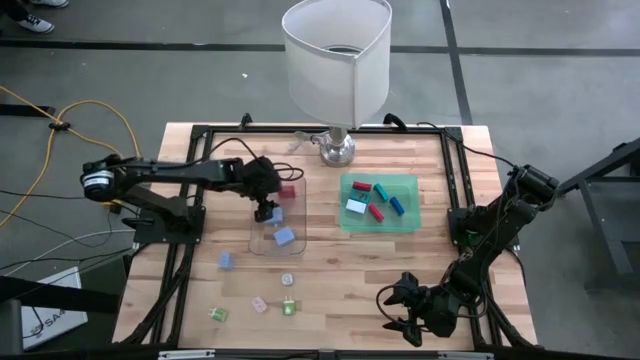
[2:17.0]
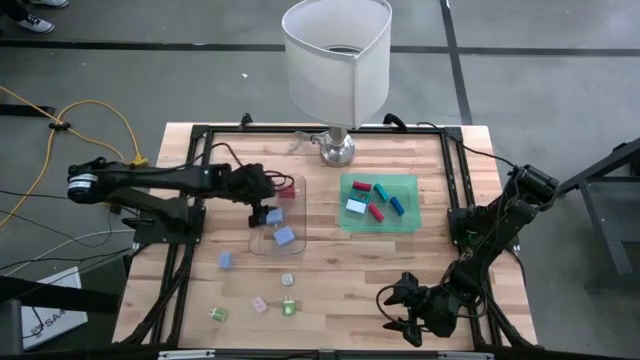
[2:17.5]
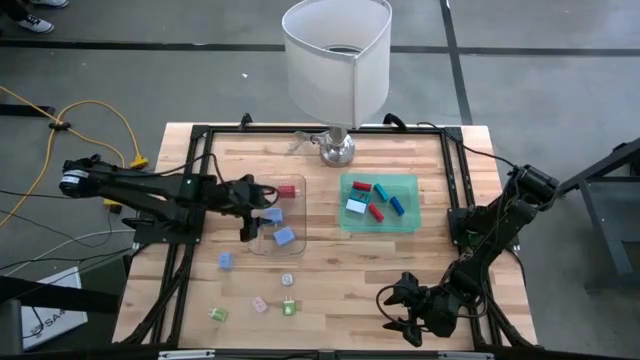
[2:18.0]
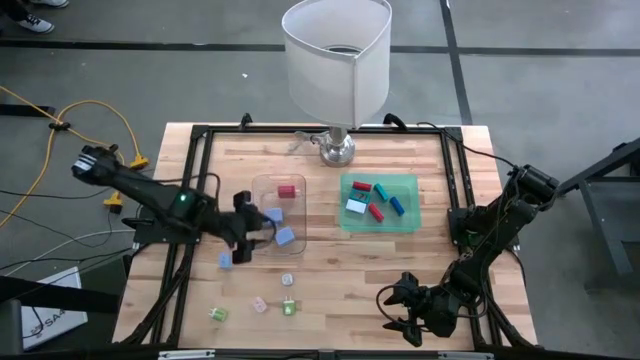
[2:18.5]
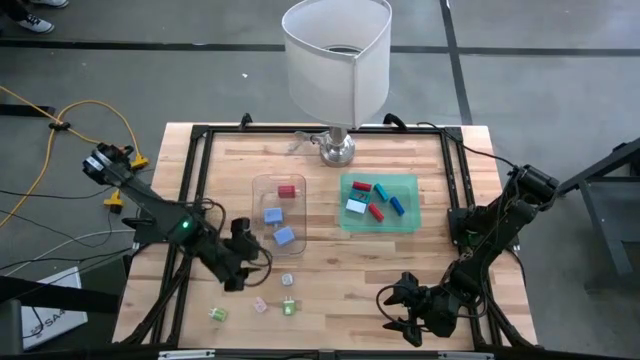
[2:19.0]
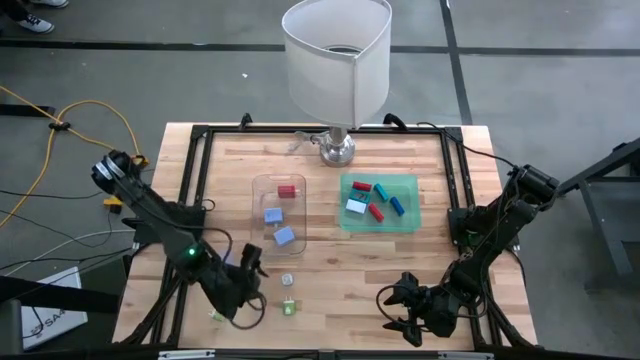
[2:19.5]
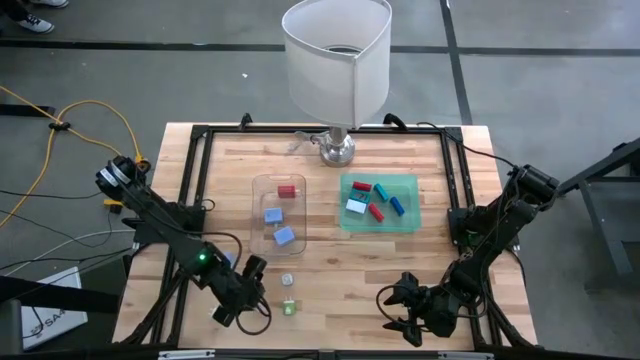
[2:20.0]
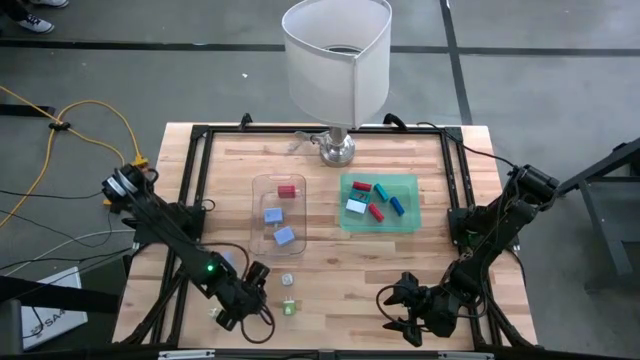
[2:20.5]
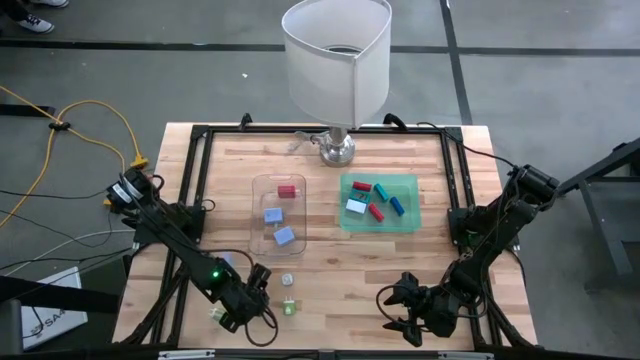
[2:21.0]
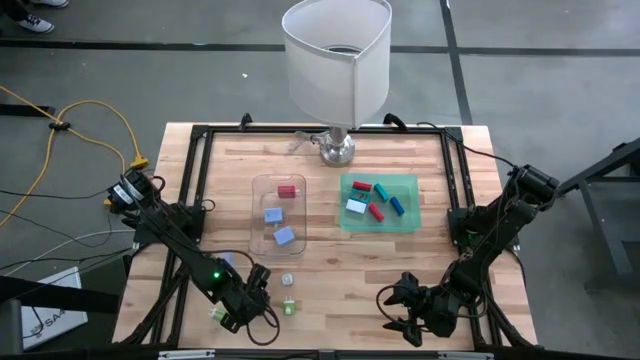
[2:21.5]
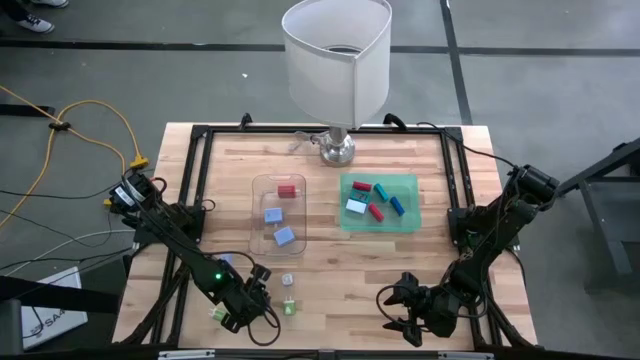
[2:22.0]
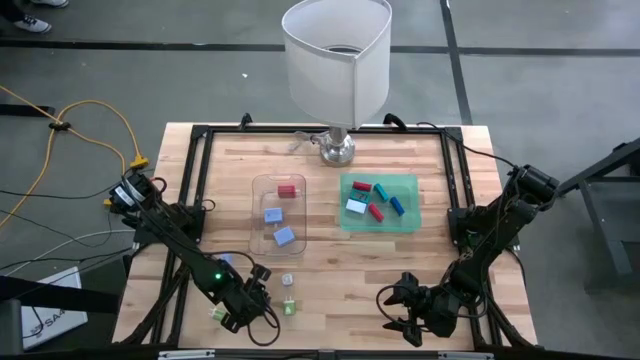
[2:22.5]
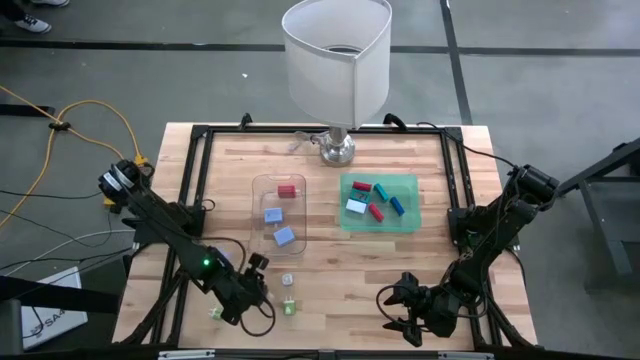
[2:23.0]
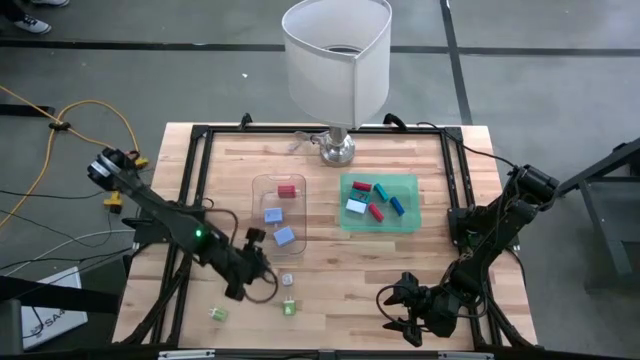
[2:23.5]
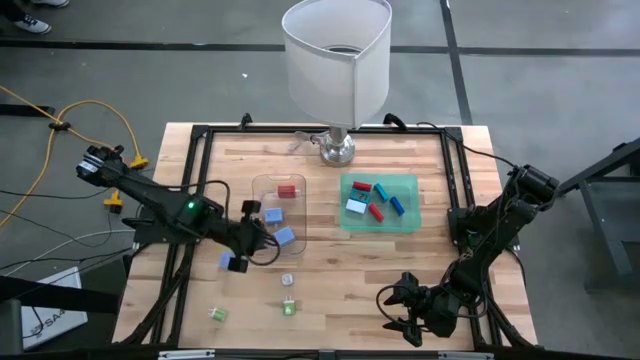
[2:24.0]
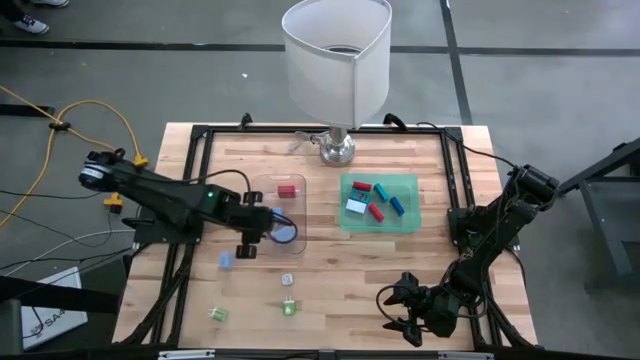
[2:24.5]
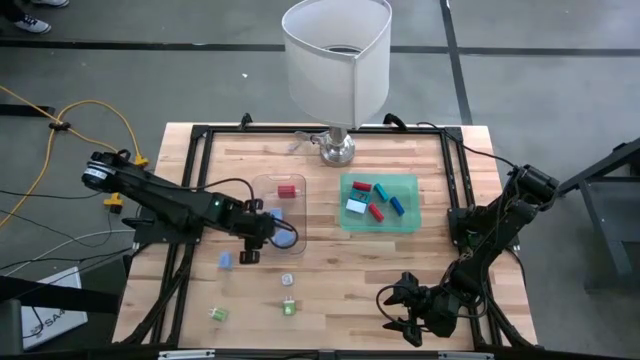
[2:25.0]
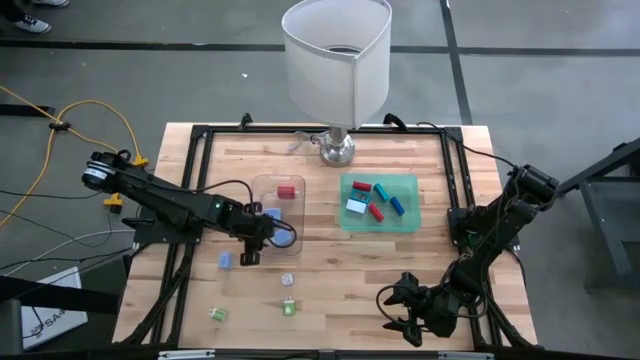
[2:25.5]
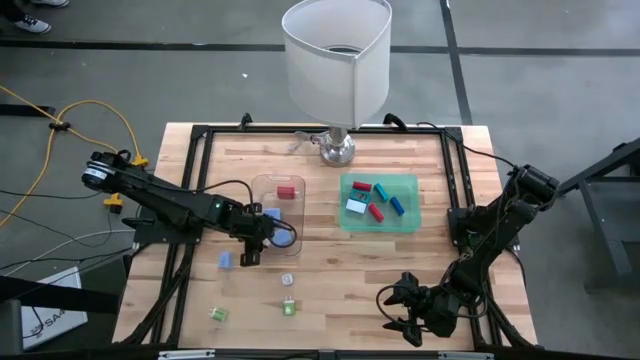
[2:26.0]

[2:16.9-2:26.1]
Task: Pick & Place Office items
Put the pink charger adapter into the transparent bin

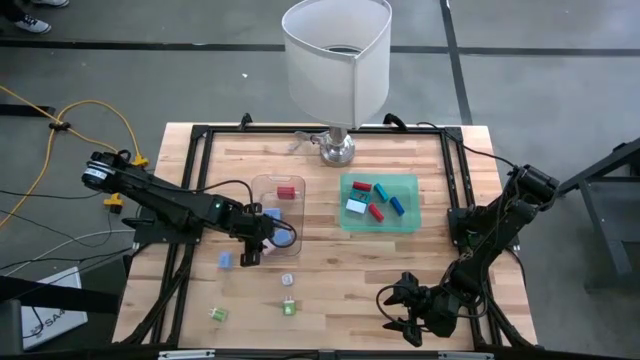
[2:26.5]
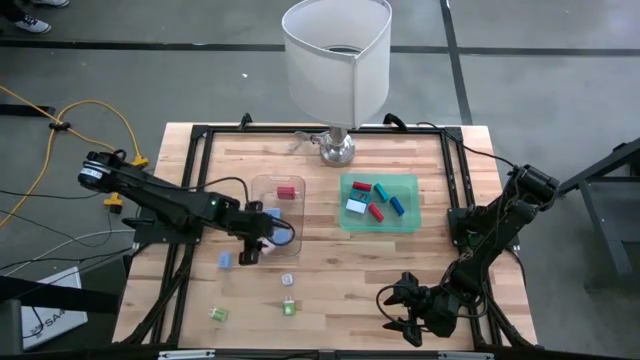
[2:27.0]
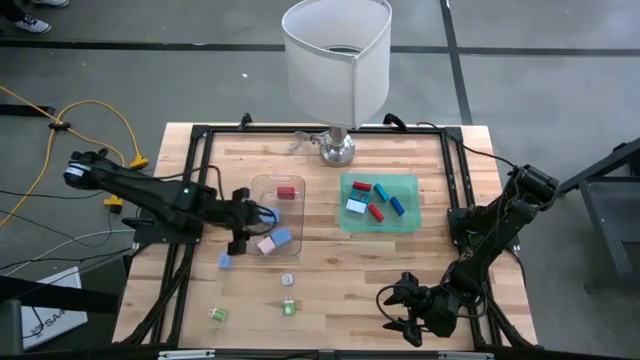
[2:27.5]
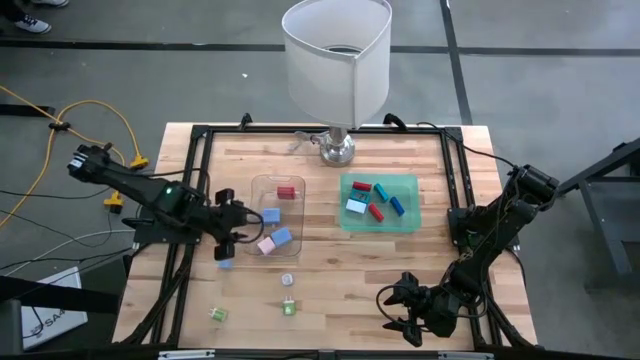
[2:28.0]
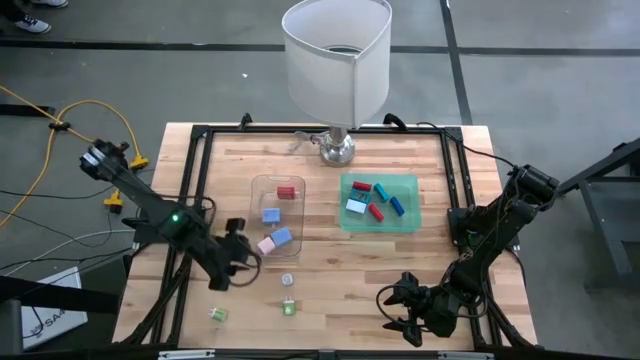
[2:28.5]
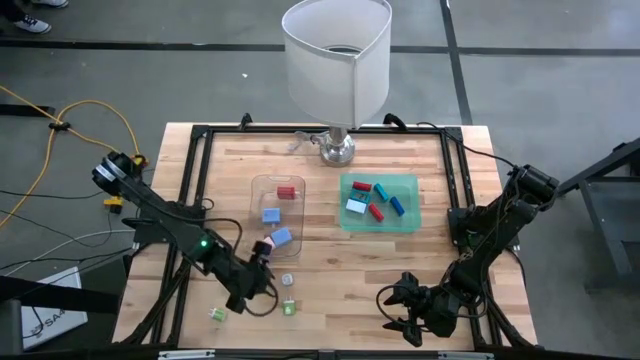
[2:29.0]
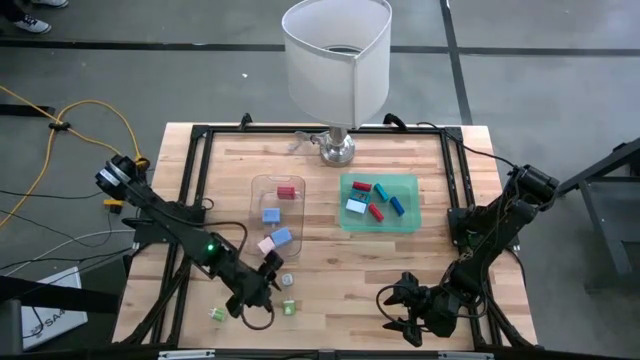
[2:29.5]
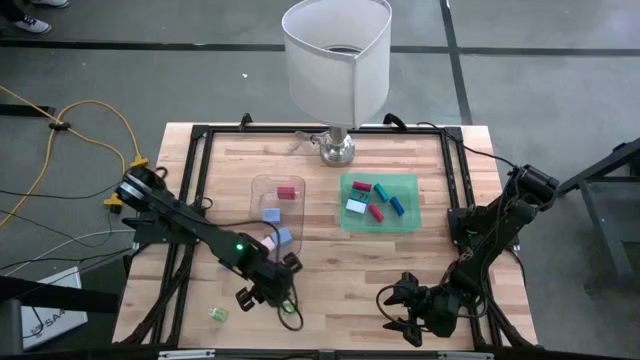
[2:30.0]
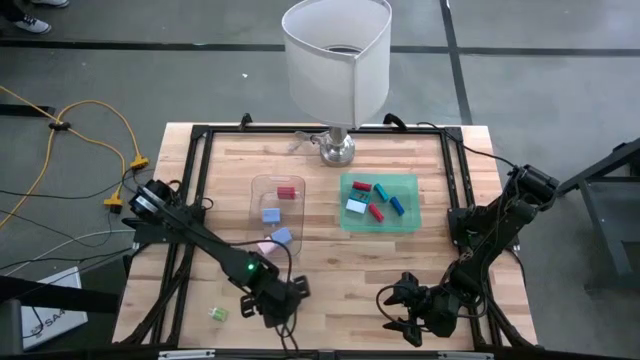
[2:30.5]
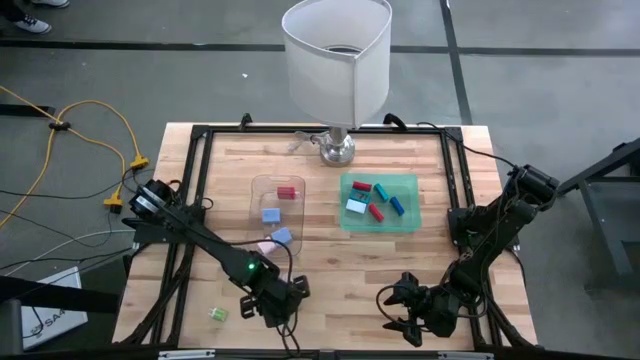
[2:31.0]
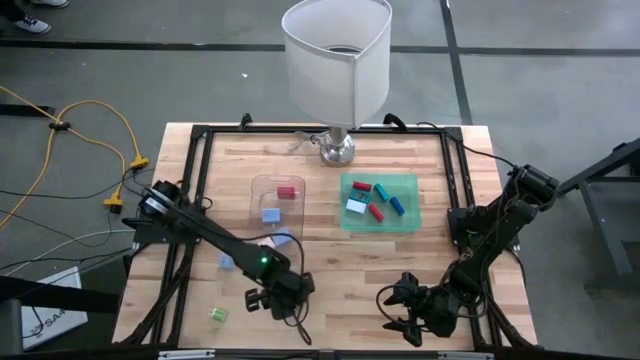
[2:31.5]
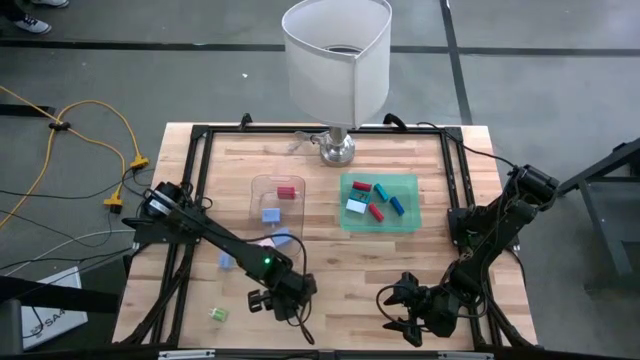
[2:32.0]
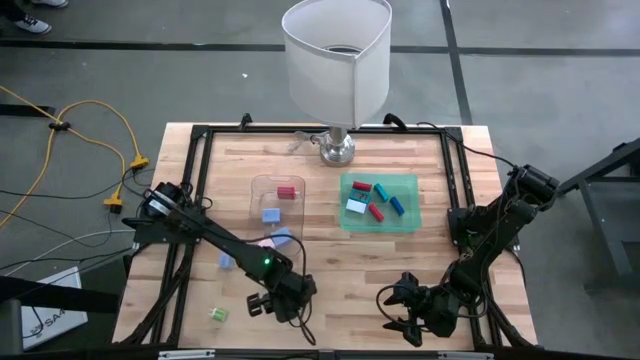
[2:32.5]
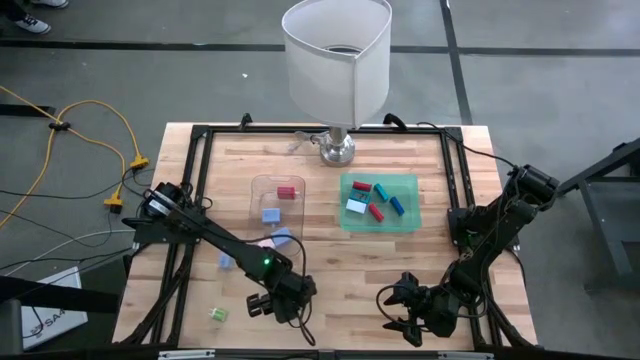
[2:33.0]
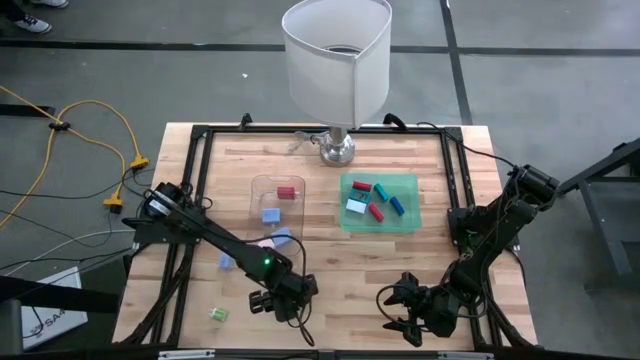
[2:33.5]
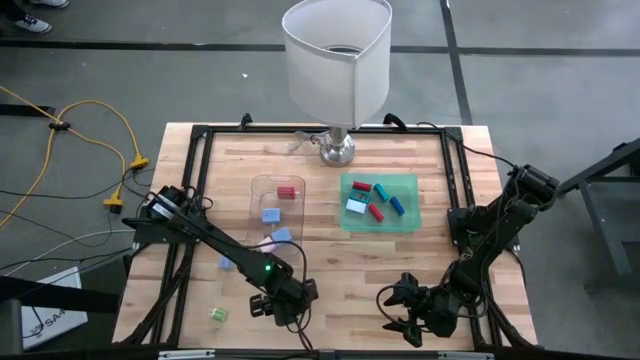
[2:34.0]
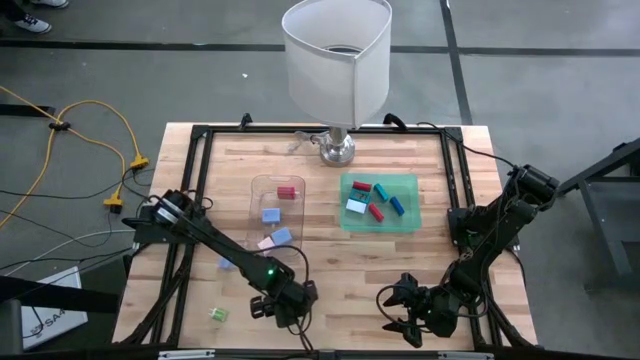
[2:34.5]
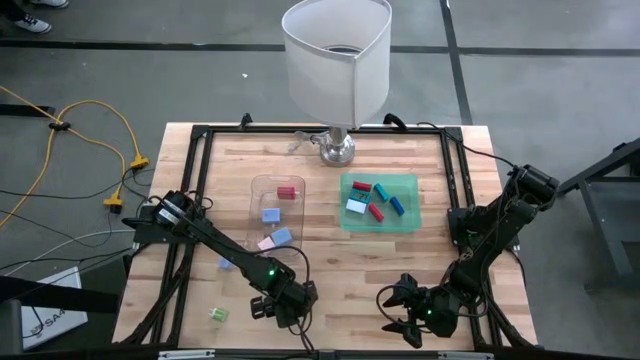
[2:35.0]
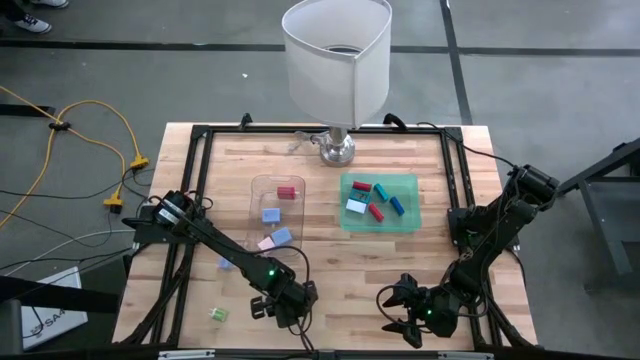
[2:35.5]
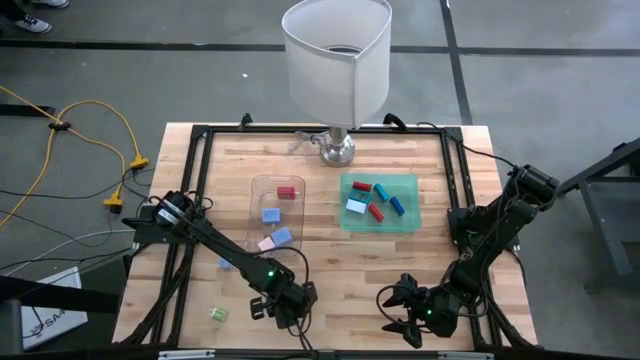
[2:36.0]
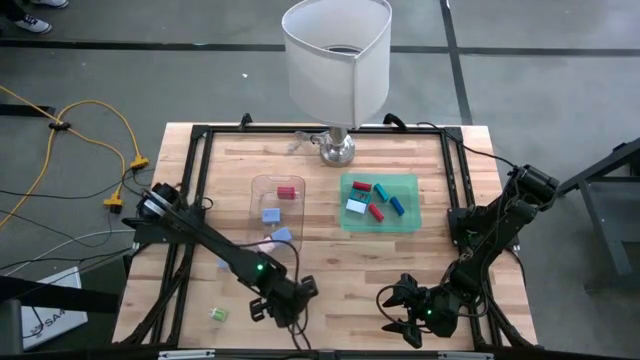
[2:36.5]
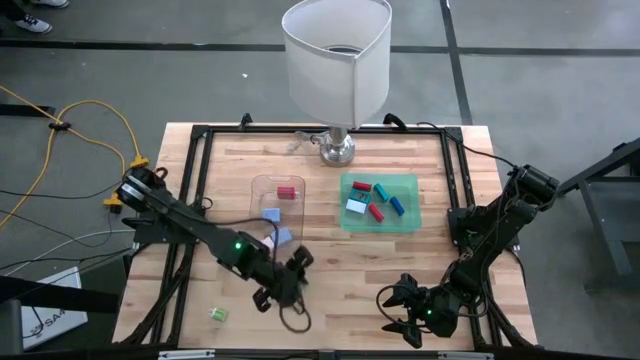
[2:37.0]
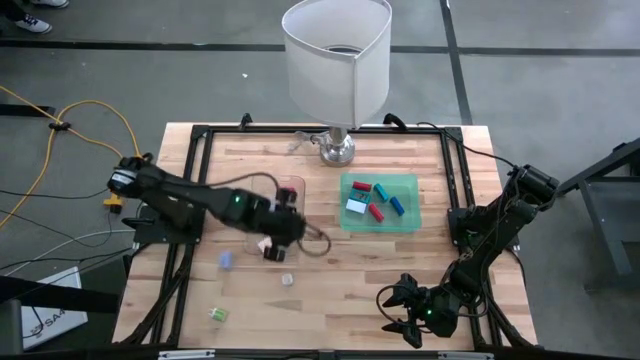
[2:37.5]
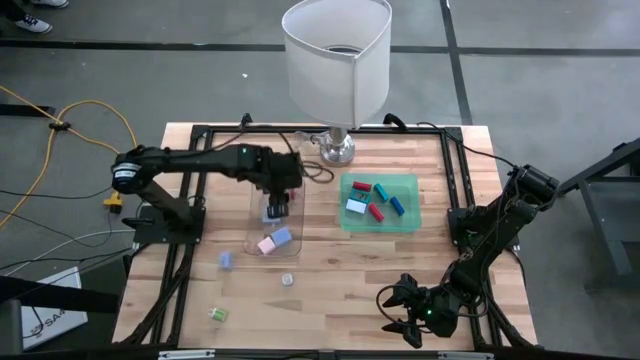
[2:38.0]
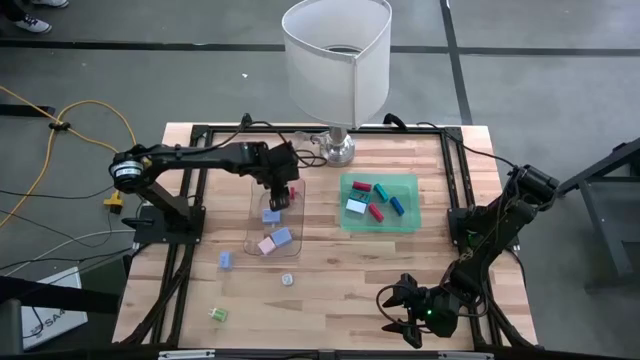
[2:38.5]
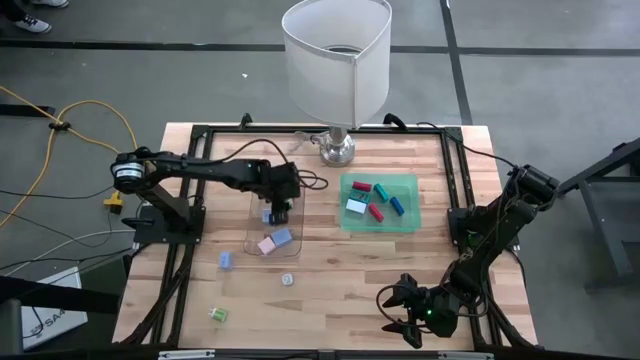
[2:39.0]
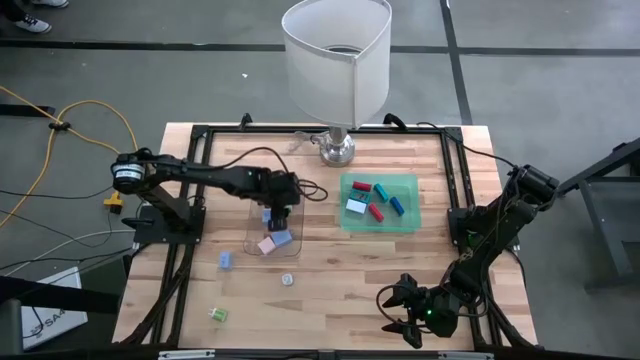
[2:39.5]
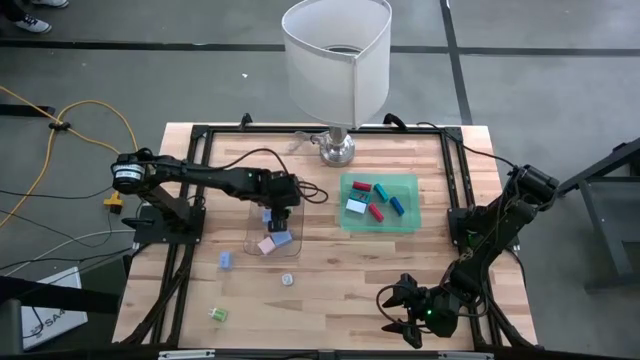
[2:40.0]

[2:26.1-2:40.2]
Put the right green charger adapter into the transparent bin
